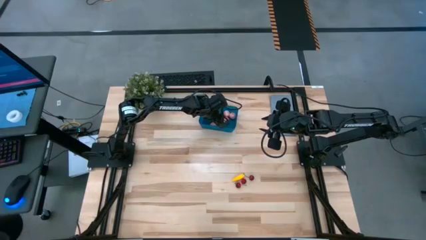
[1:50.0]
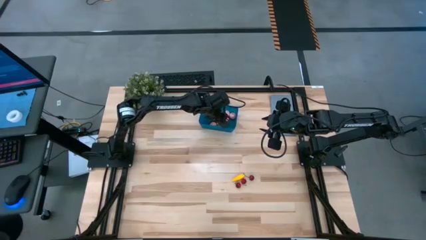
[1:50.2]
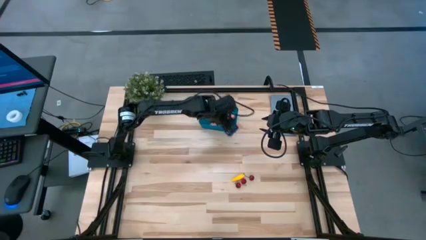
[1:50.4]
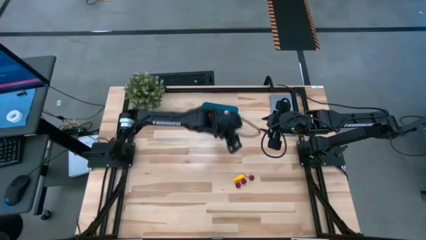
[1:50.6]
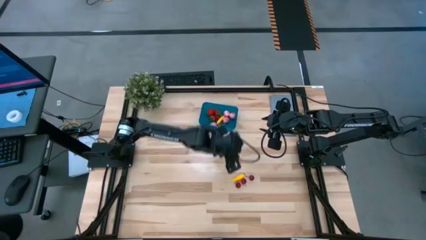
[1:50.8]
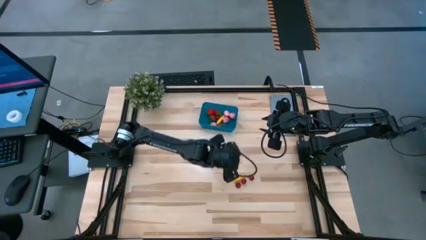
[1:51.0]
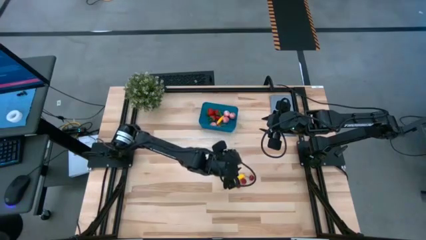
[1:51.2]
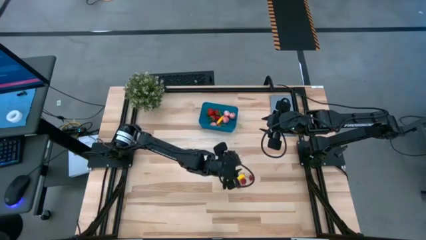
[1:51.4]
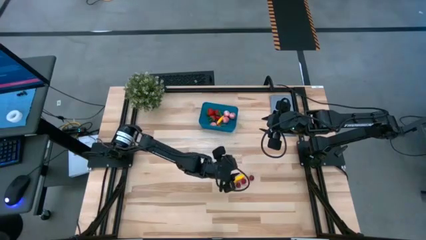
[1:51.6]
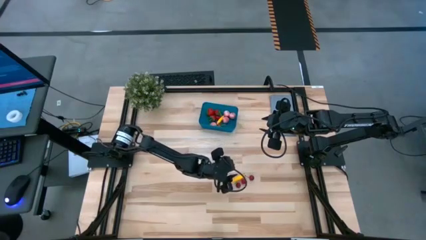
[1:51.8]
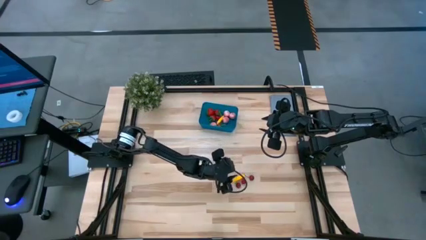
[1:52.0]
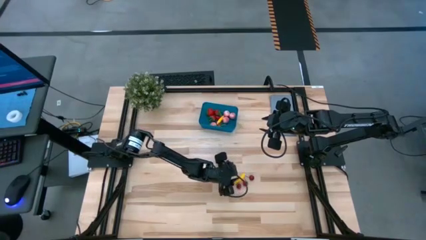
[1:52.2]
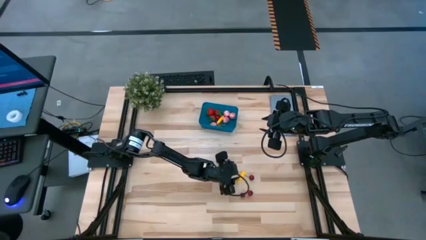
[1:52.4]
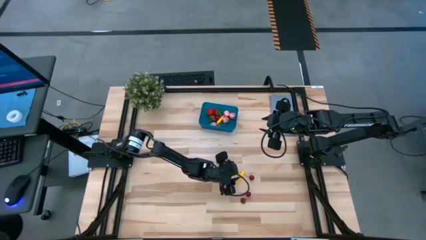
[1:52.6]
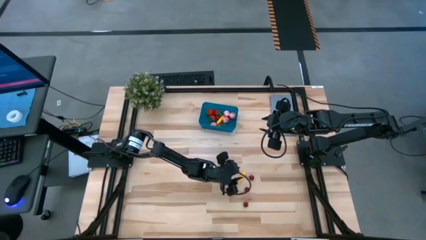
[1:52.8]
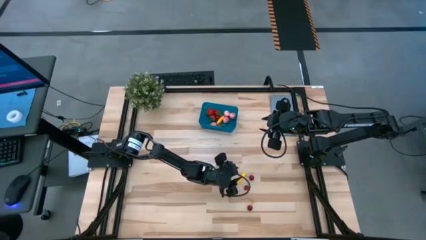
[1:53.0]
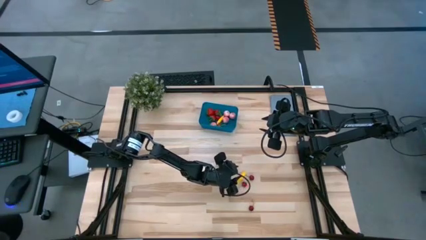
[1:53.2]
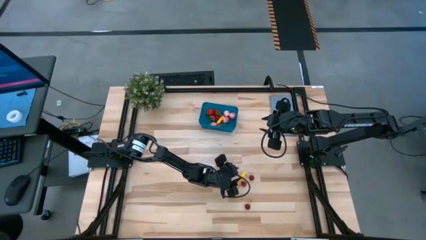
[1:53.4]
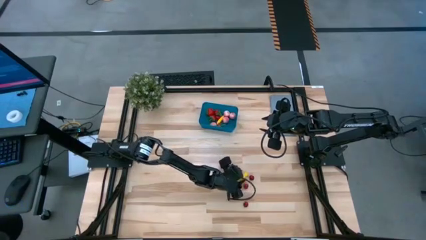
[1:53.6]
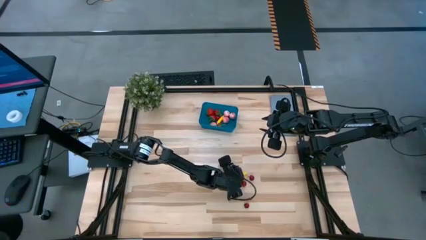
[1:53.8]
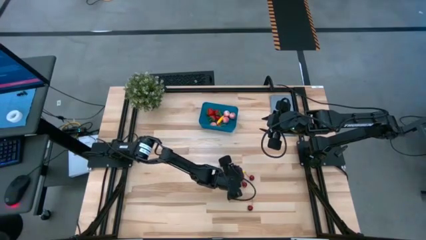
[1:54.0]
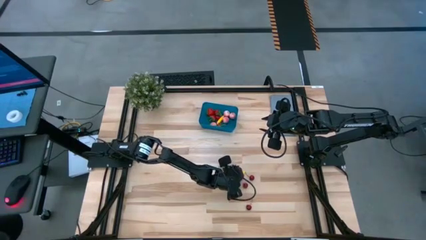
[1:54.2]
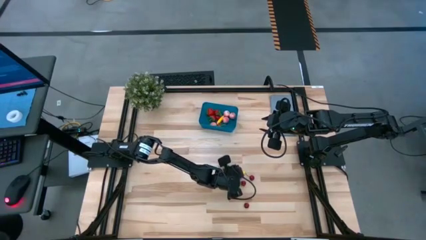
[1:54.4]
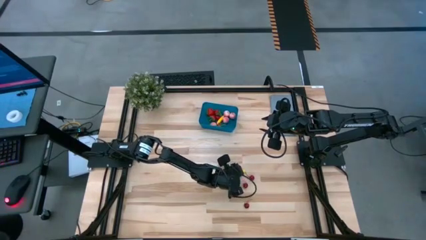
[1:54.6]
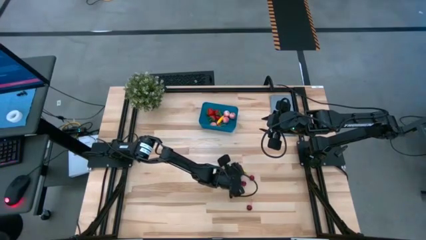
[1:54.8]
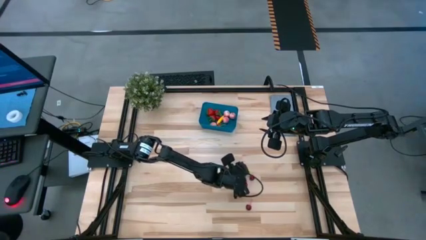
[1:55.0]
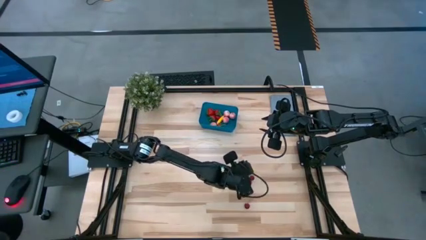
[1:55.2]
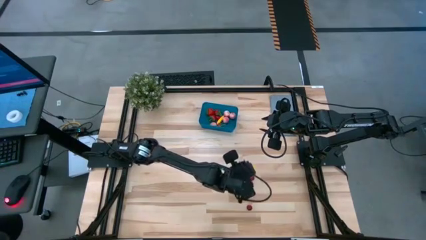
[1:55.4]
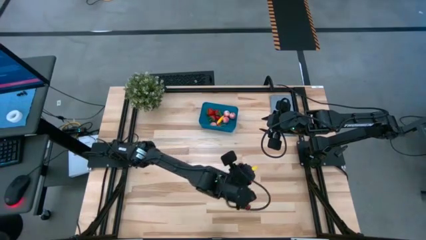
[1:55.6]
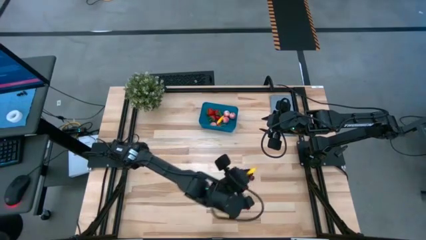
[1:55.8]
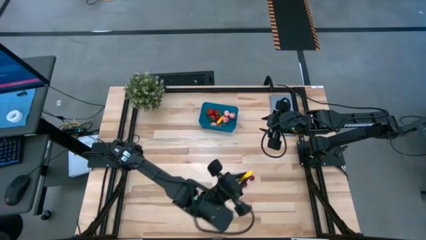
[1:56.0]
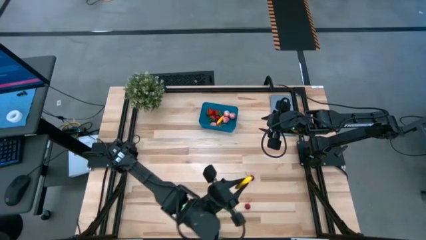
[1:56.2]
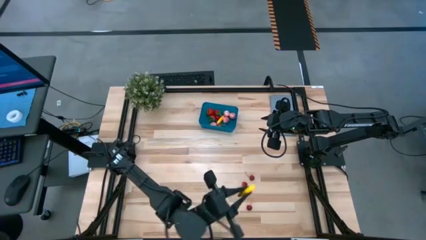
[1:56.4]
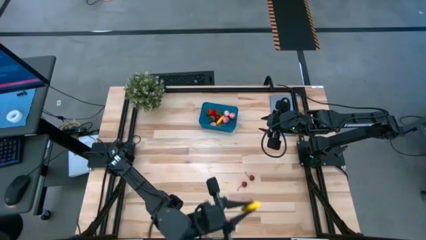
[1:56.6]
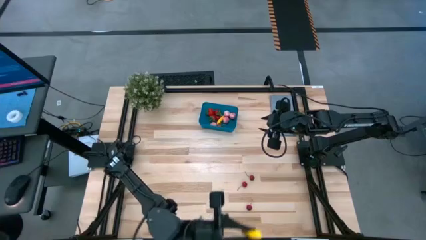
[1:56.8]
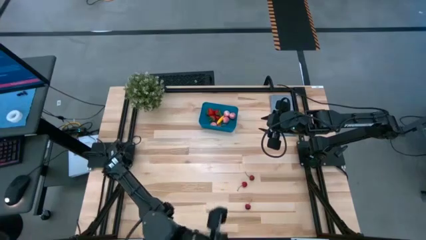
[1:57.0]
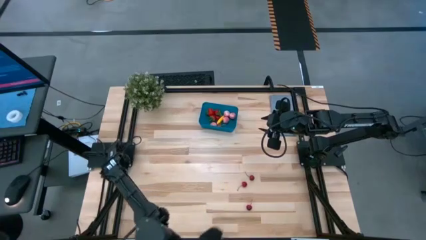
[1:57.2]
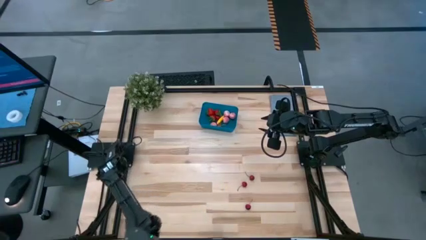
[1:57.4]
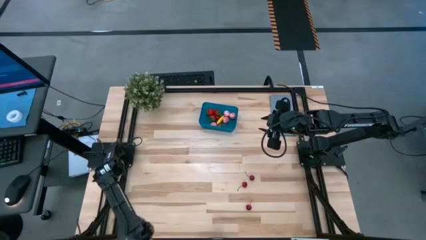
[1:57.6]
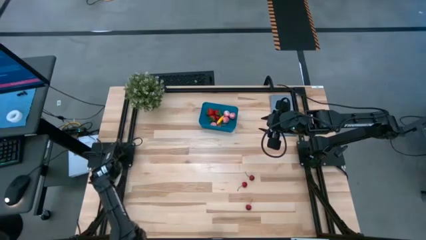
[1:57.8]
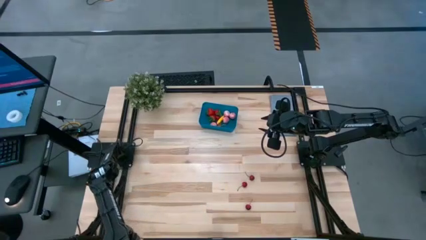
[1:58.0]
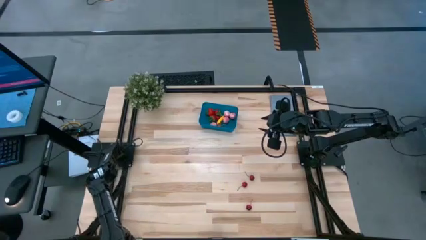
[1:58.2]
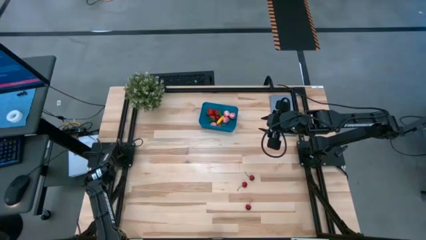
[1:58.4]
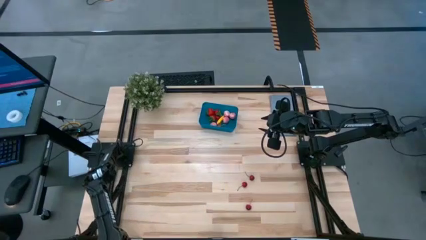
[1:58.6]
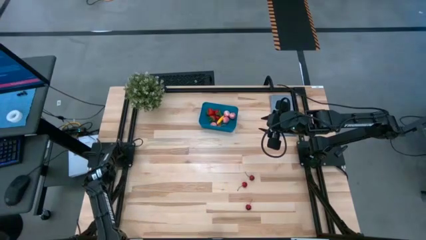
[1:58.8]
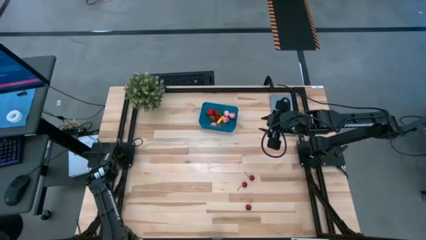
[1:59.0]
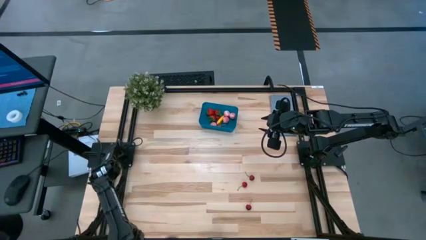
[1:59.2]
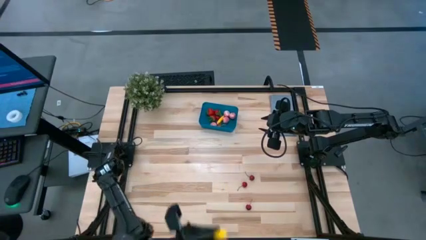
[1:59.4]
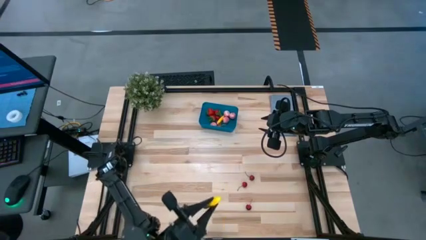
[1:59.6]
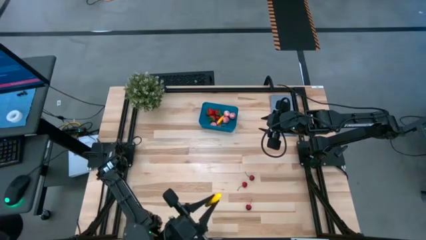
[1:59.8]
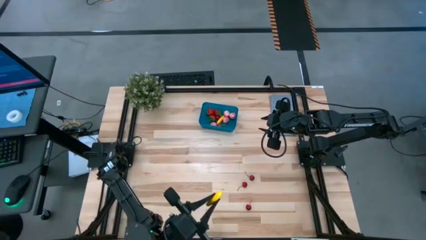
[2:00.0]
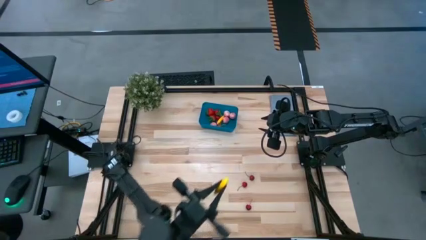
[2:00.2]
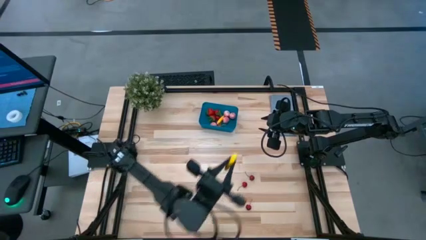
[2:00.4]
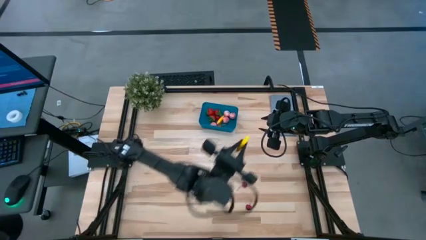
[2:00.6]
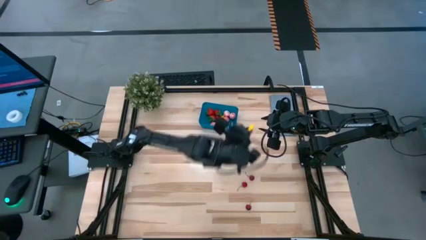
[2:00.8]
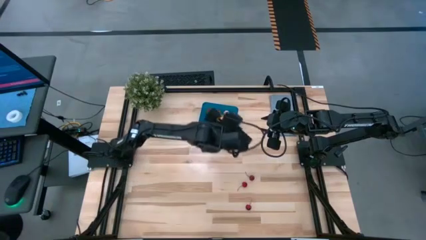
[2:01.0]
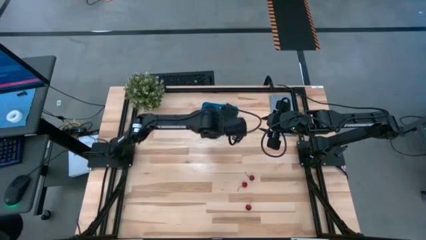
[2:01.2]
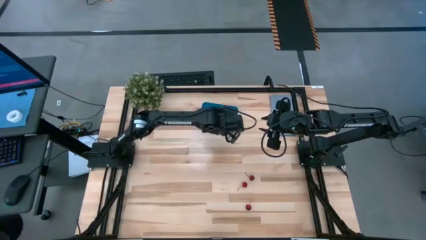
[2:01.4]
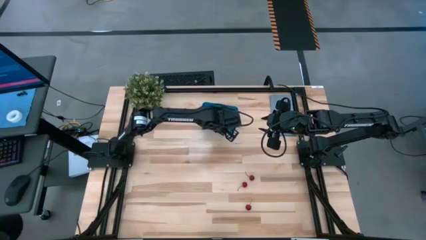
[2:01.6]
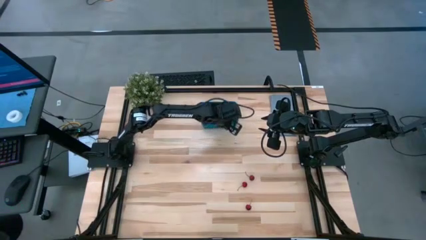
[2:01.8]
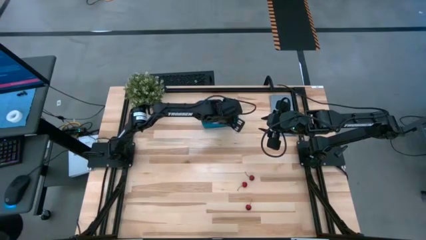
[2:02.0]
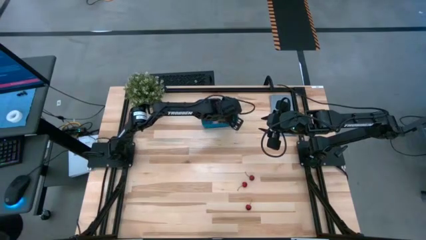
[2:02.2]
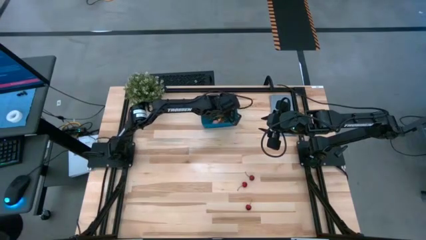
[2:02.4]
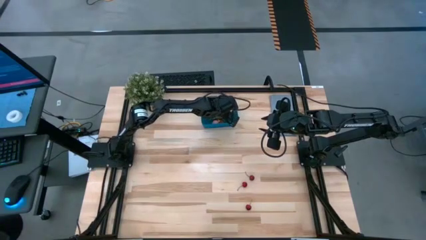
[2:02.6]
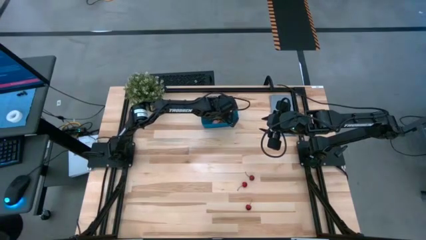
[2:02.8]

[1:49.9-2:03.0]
Task: Pick and placing Produce into tupperware
Put the corn into the blue bin

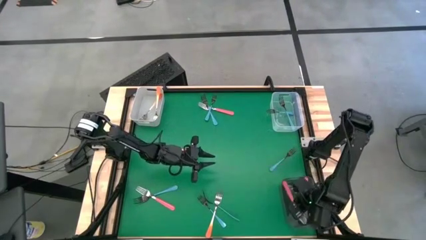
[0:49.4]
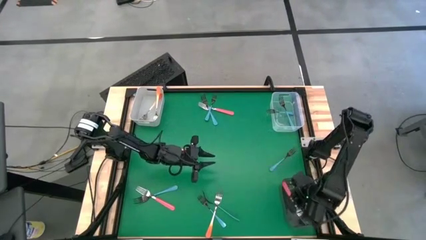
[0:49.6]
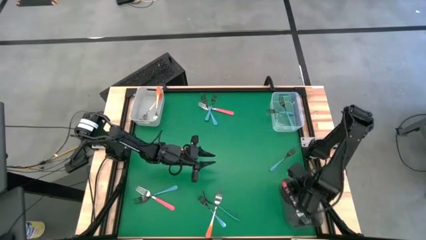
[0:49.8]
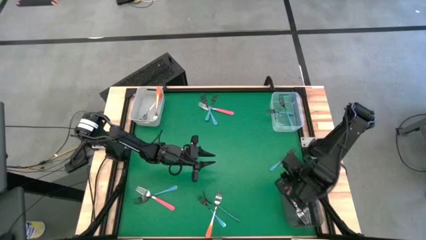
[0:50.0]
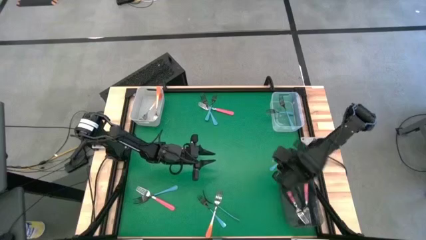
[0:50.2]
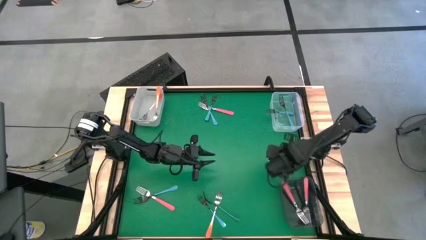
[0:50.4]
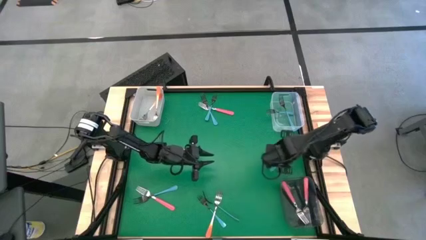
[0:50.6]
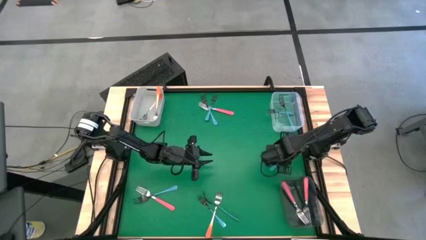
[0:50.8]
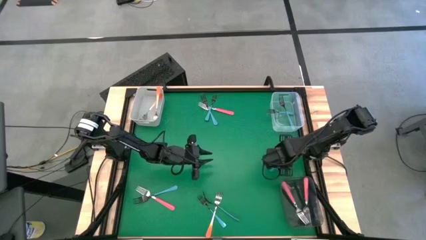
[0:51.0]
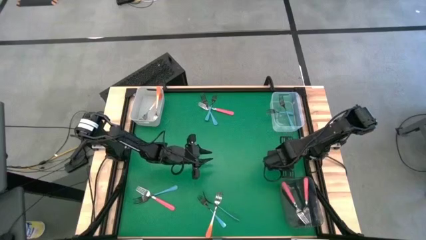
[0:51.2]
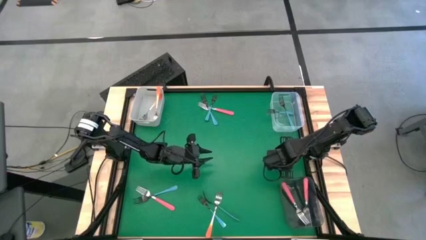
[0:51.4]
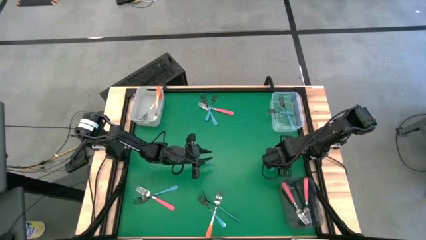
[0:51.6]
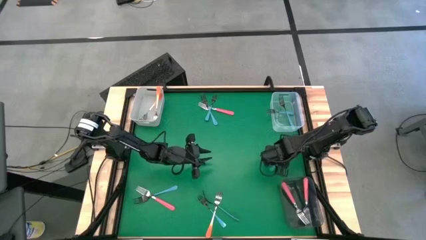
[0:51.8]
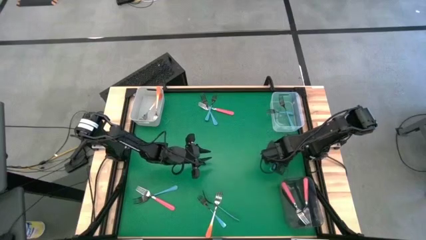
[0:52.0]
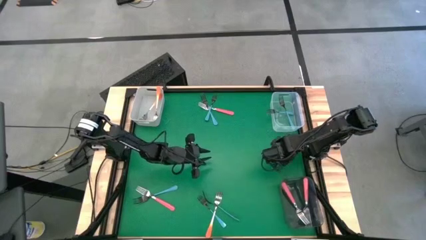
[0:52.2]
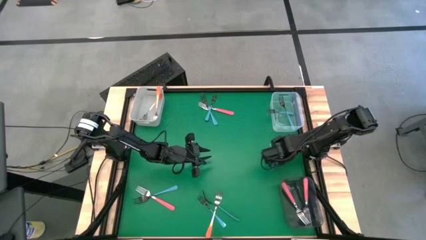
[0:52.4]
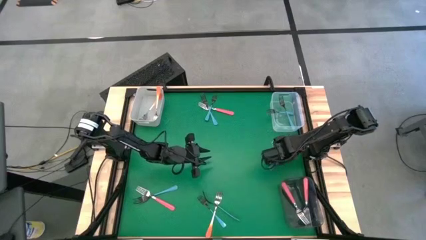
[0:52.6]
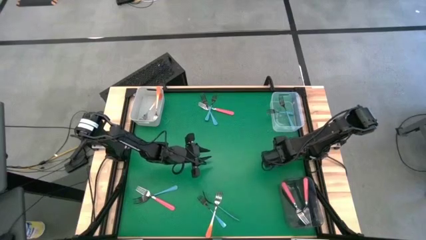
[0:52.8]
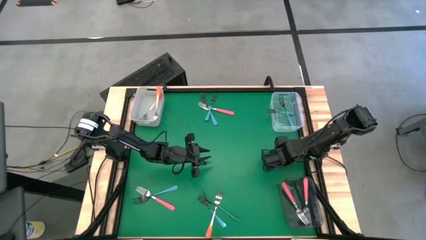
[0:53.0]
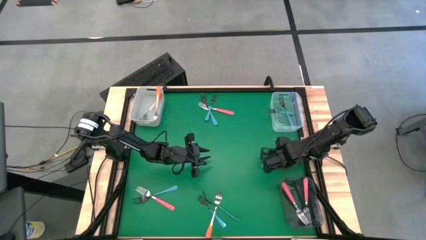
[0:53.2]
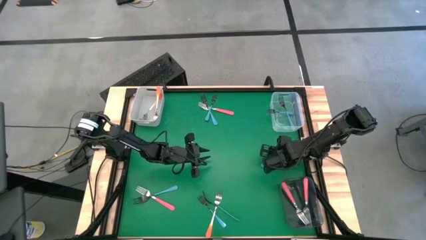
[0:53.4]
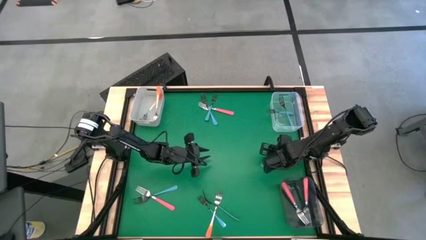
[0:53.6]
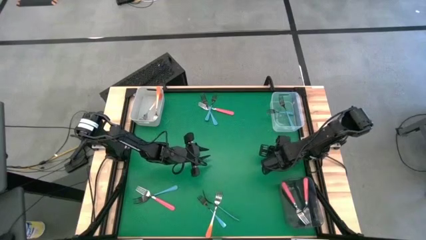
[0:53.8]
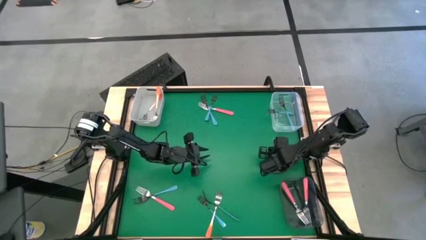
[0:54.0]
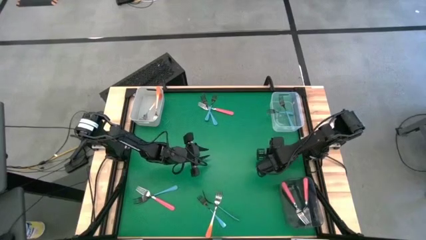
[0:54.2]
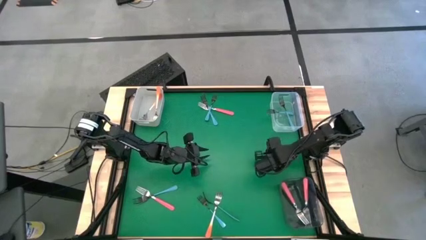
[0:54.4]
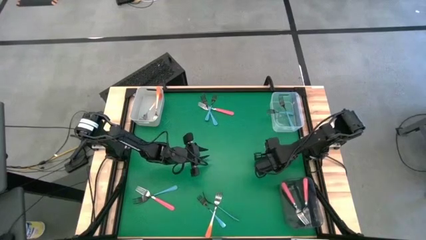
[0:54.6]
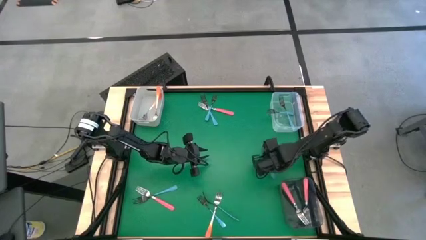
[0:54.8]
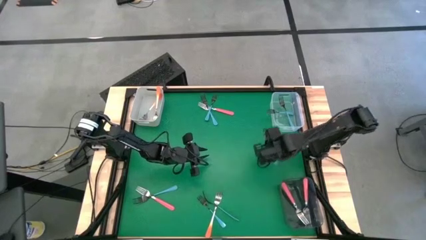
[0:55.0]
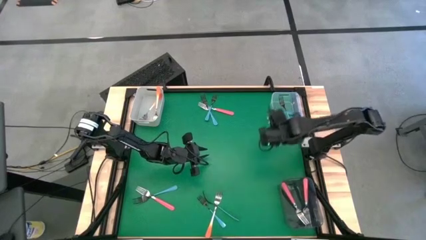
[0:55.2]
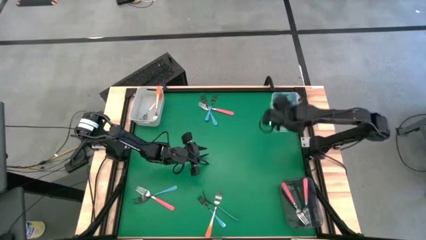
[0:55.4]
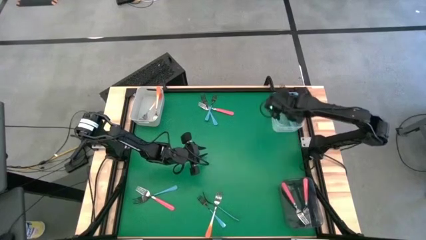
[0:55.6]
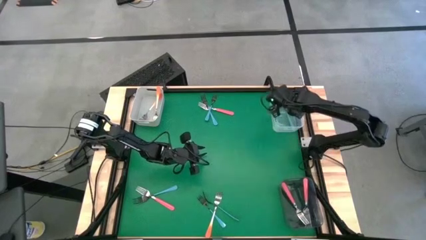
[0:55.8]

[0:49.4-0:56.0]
Task: Sort silverware by color (type)
Put the blue fork into the transparent bin
